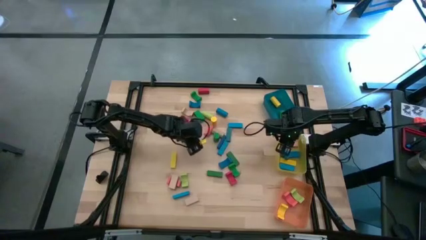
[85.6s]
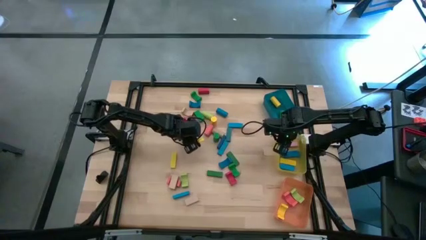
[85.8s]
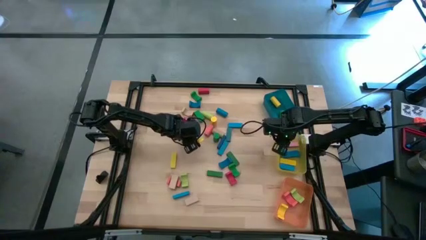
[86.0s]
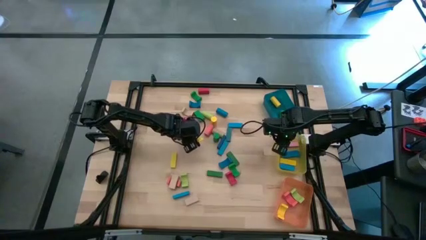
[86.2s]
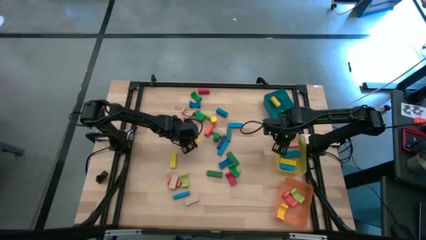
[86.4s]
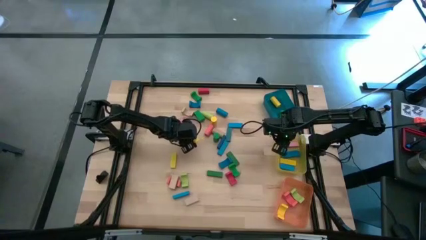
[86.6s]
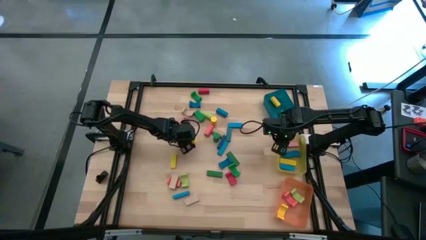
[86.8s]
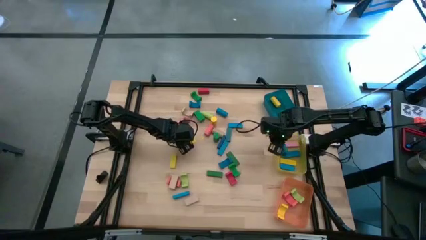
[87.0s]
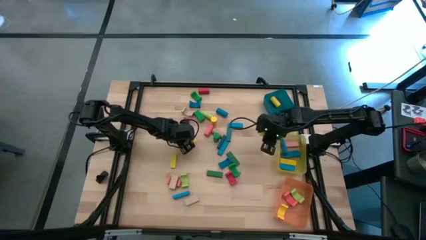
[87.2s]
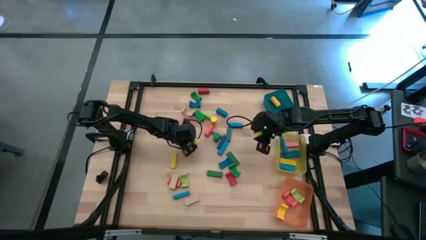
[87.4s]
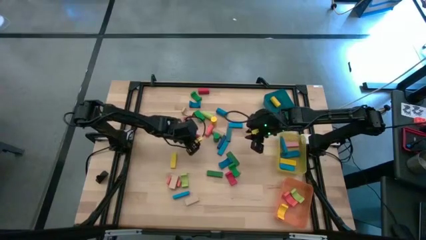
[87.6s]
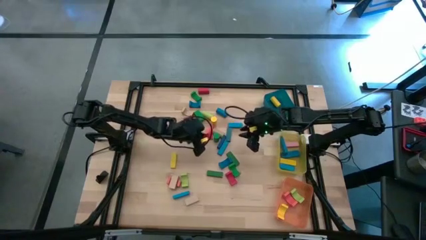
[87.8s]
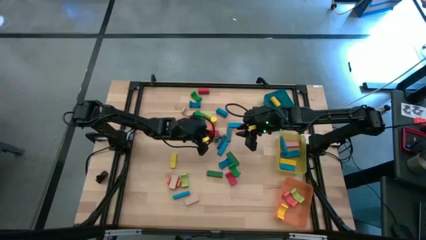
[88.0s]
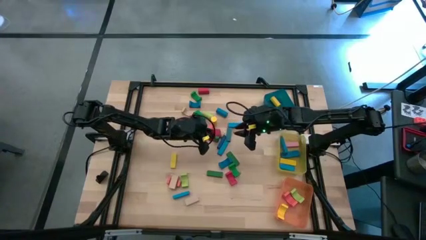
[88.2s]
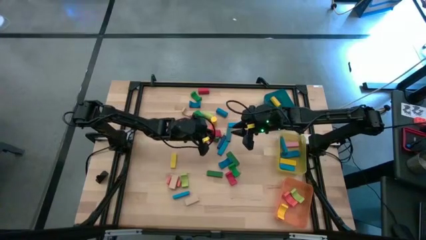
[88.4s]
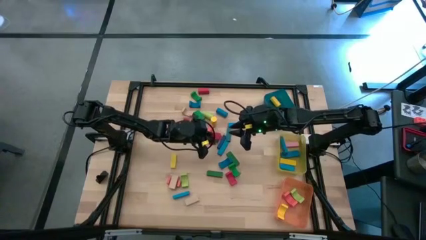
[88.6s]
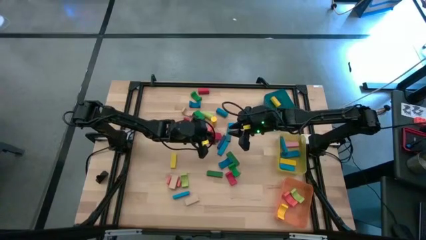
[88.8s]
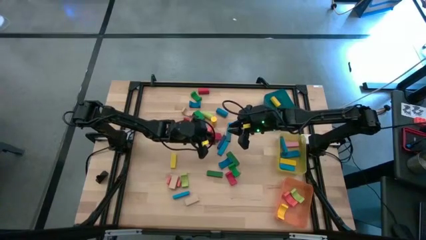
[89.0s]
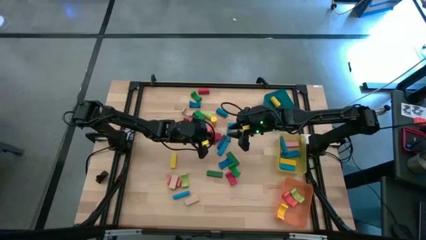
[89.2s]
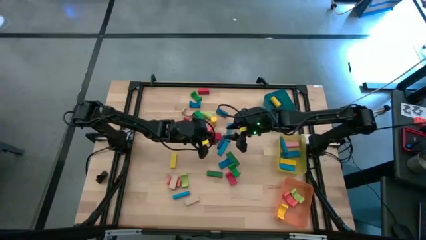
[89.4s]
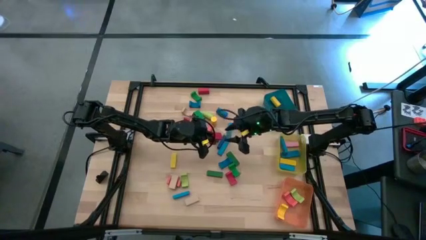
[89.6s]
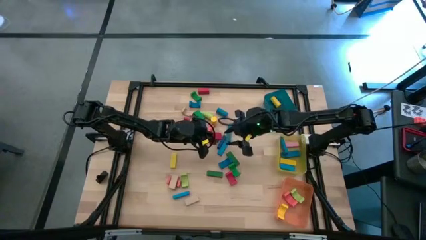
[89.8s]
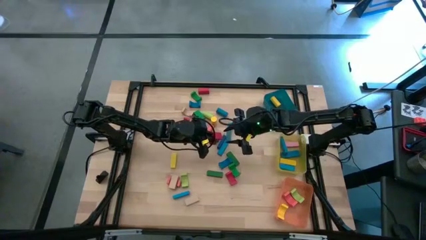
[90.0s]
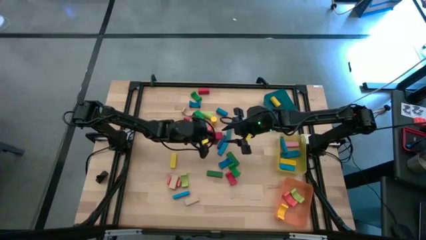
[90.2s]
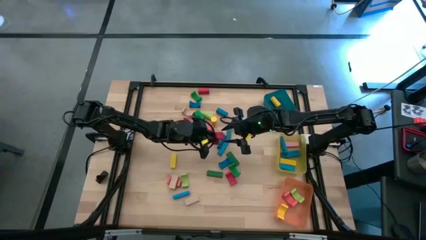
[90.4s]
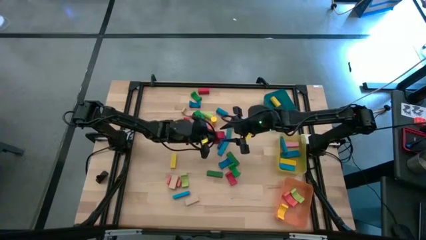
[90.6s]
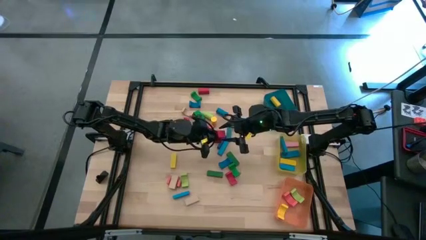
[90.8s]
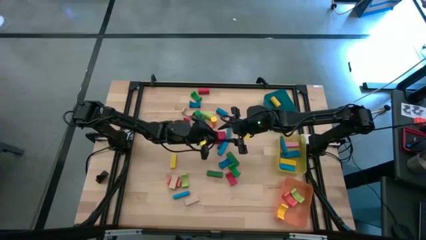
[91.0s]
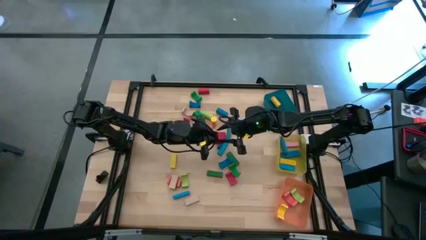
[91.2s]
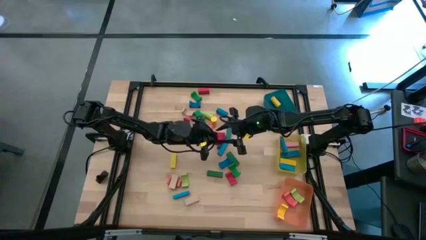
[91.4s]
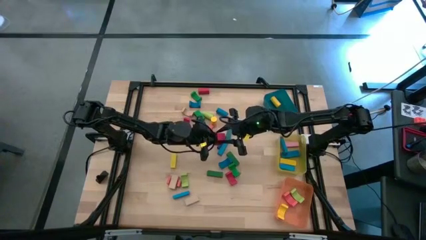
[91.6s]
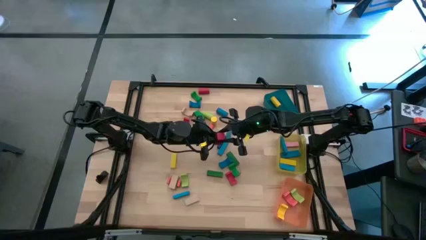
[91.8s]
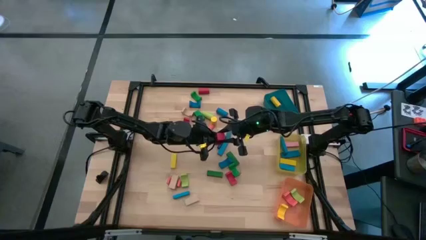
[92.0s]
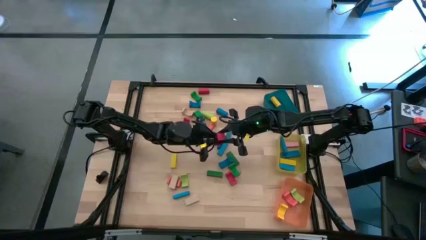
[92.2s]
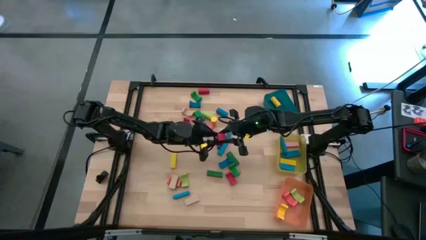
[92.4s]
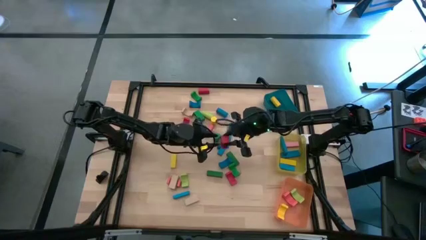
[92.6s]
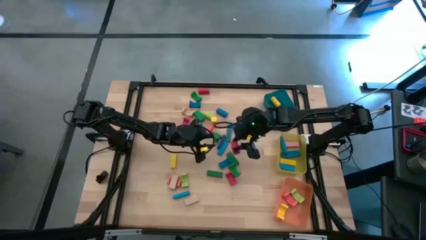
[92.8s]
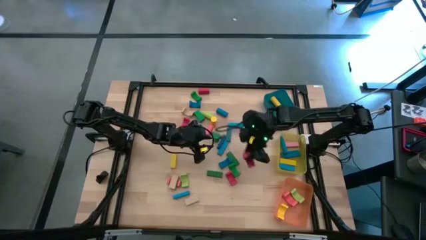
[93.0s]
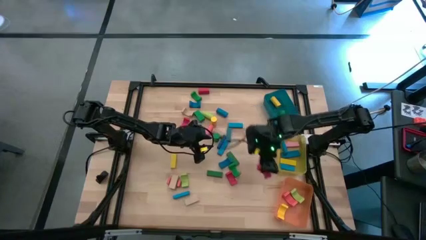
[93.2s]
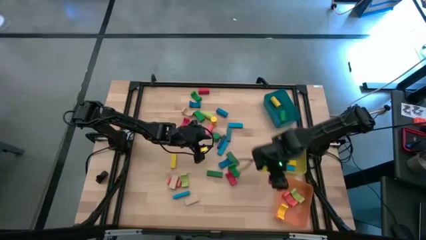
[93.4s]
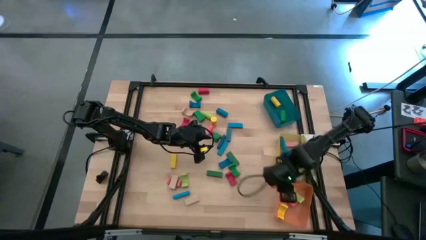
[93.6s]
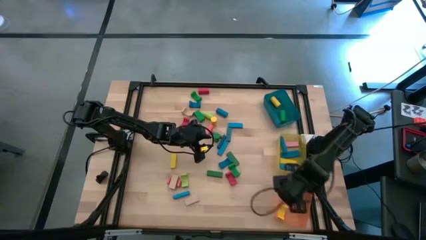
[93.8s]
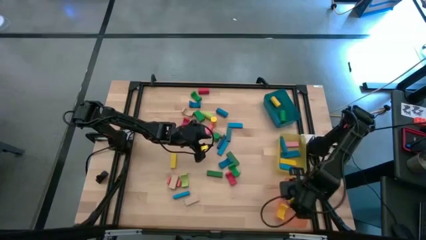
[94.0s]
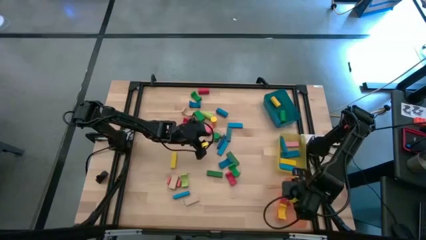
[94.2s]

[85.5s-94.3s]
Task: Sort blocks by size
Put the red arch block into the orange bin

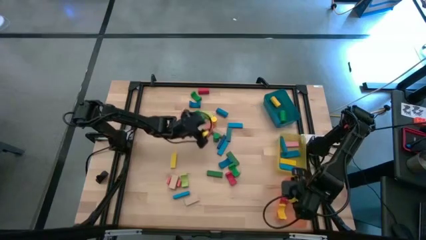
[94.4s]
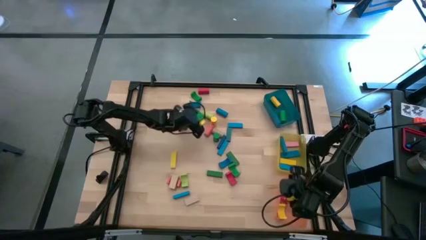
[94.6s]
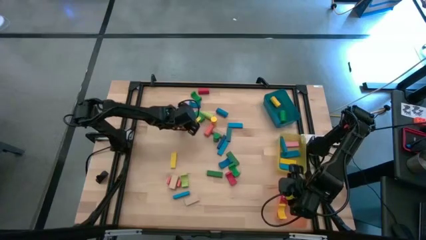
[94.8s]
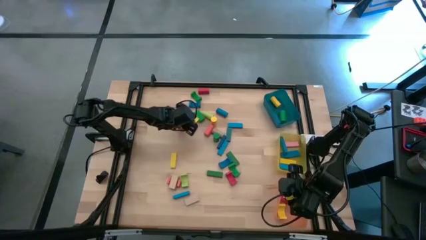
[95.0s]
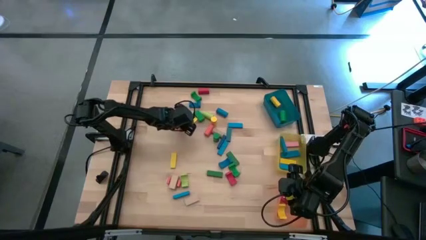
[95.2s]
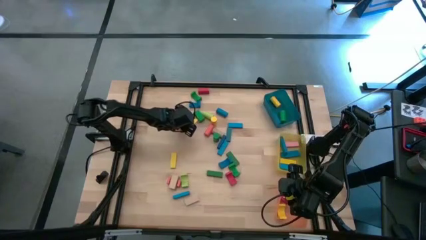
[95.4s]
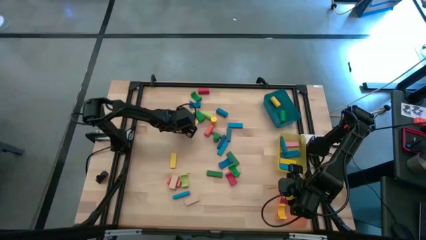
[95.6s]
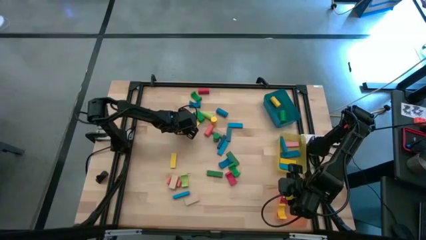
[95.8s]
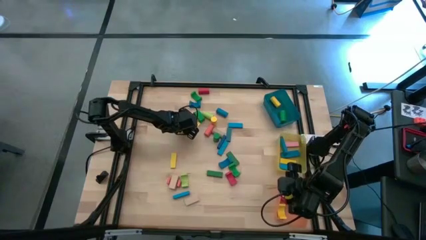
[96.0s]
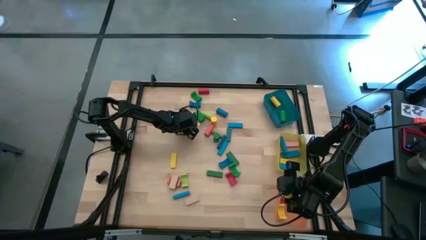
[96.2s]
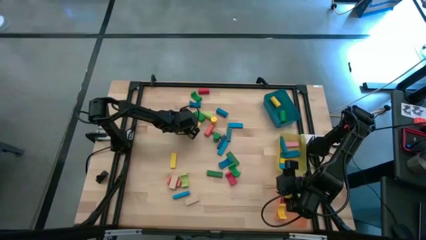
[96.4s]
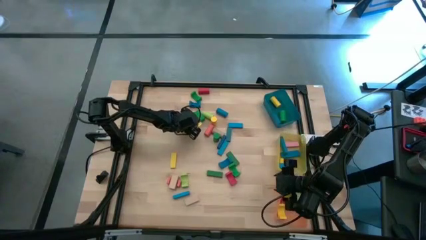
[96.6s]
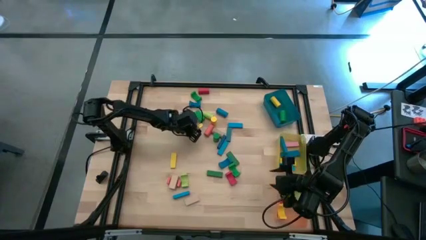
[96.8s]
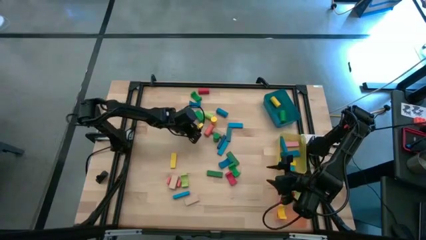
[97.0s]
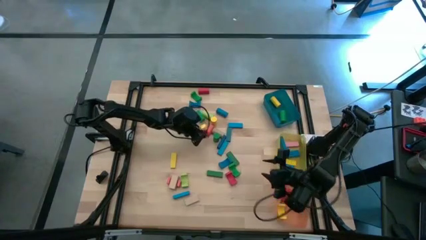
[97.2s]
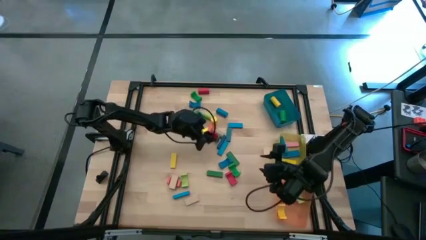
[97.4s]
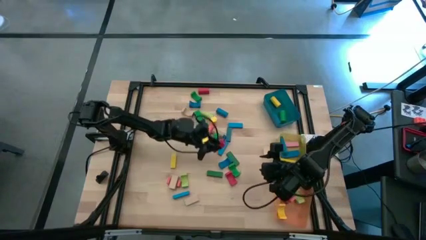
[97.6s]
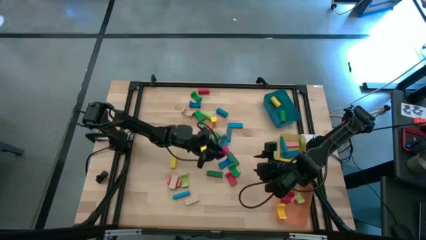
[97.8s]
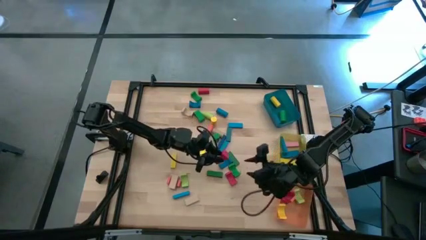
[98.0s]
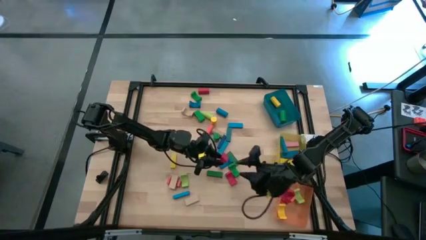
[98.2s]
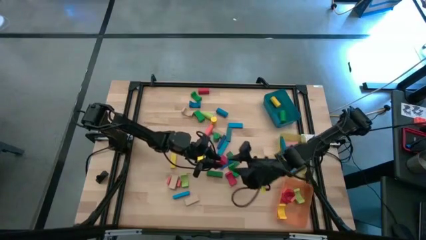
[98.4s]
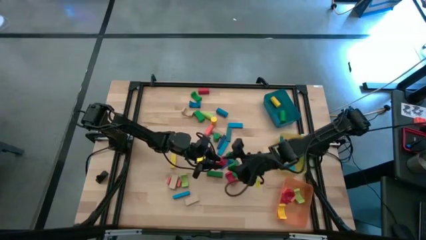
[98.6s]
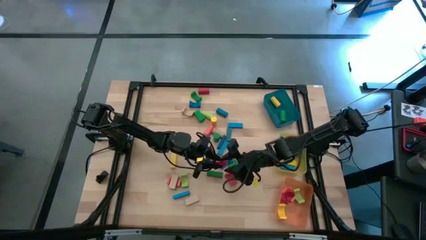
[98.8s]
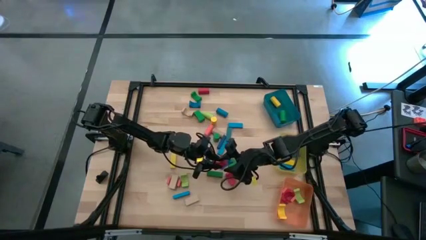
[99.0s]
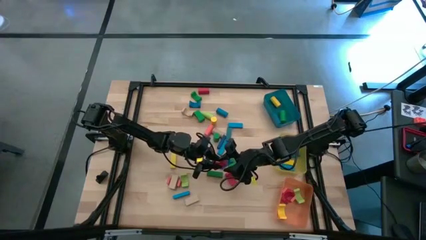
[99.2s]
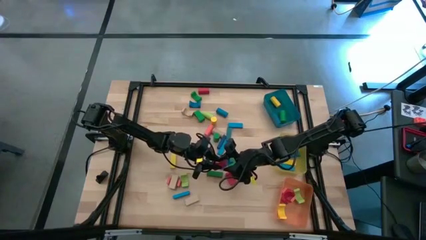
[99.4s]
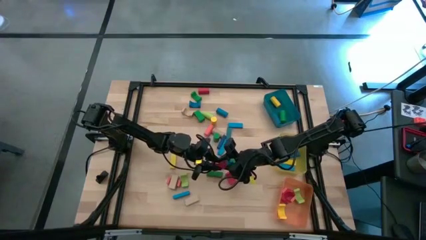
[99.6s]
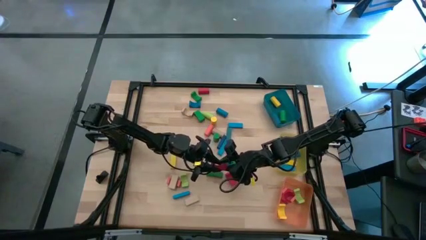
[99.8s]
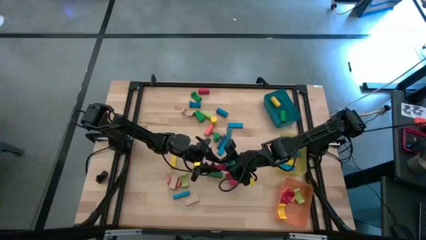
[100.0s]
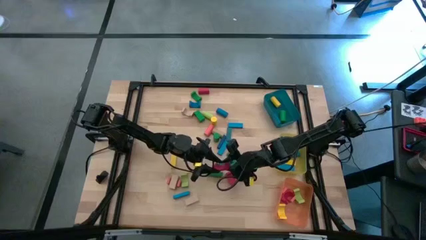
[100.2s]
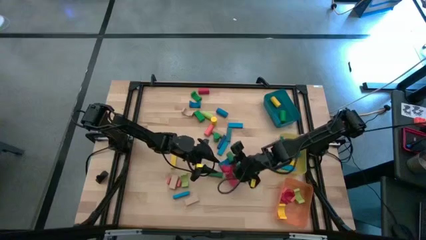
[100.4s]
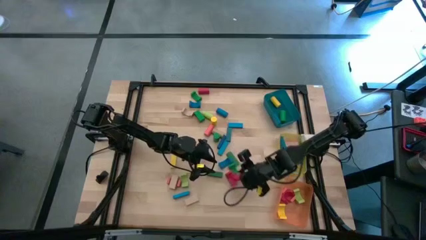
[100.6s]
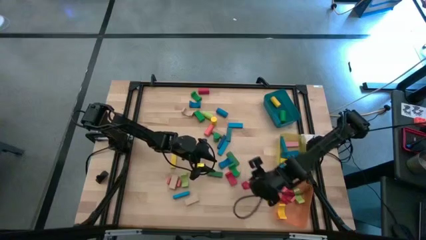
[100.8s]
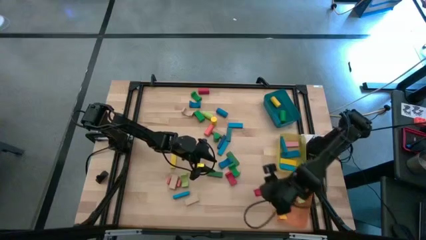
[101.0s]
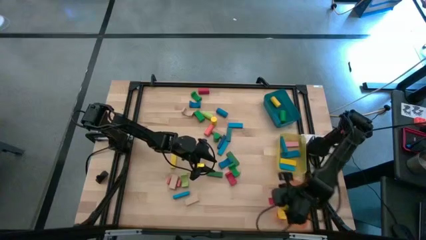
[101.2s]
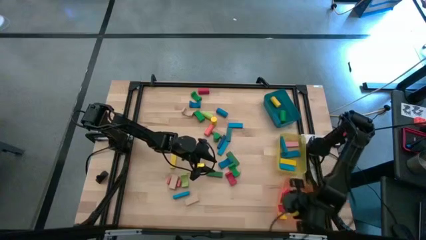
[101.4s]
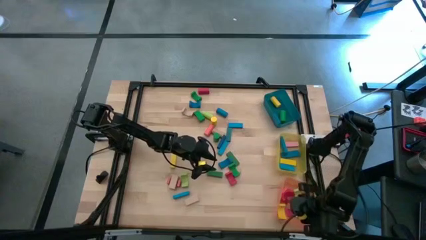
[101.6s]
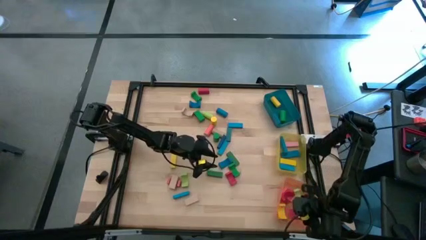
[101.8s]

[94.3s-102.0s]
Put the red arch block into the orange bin
